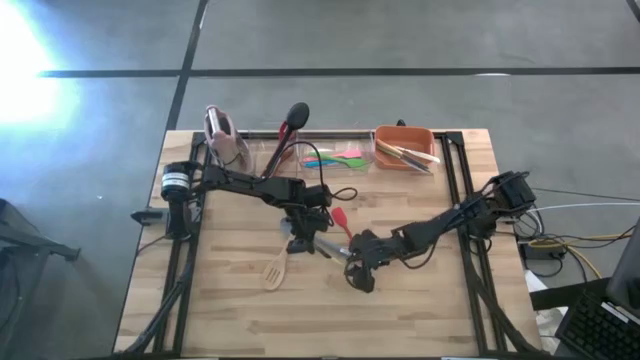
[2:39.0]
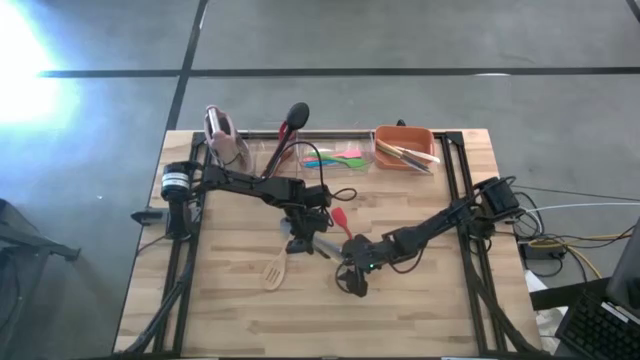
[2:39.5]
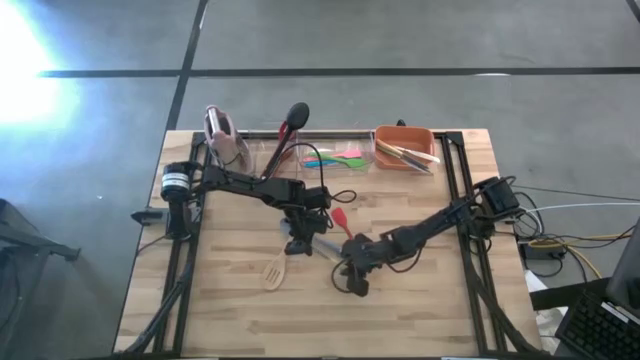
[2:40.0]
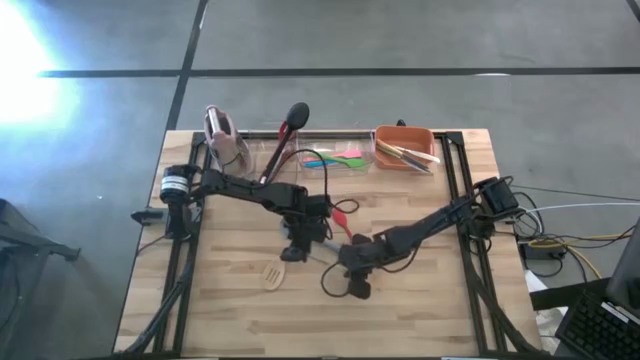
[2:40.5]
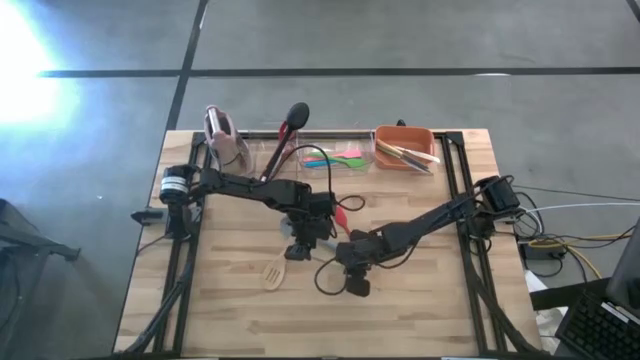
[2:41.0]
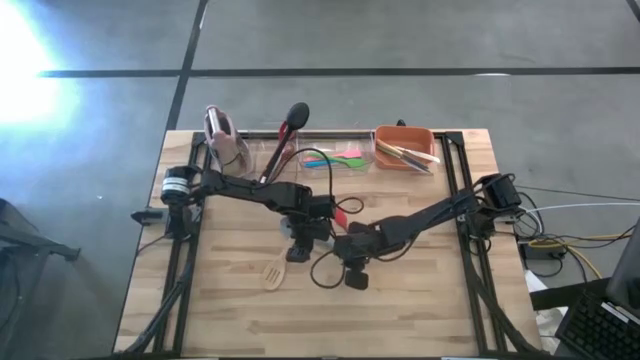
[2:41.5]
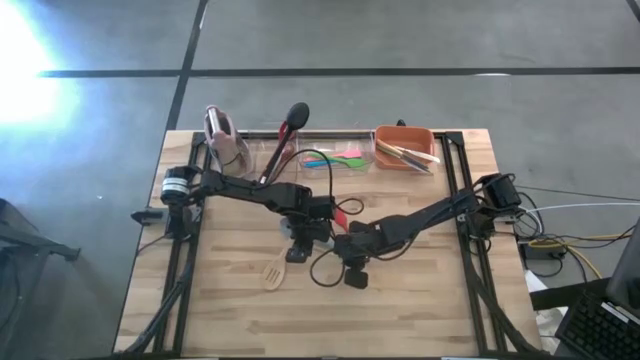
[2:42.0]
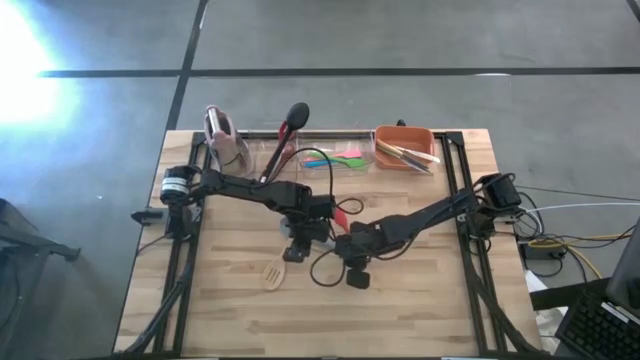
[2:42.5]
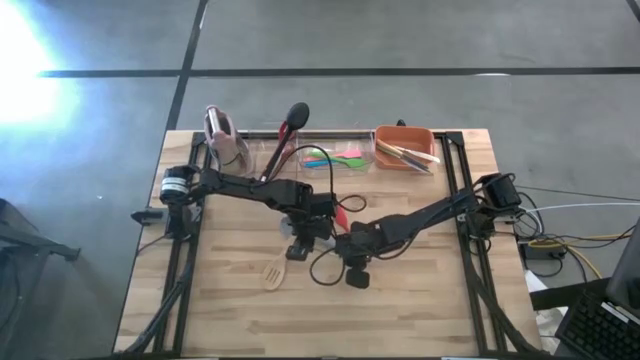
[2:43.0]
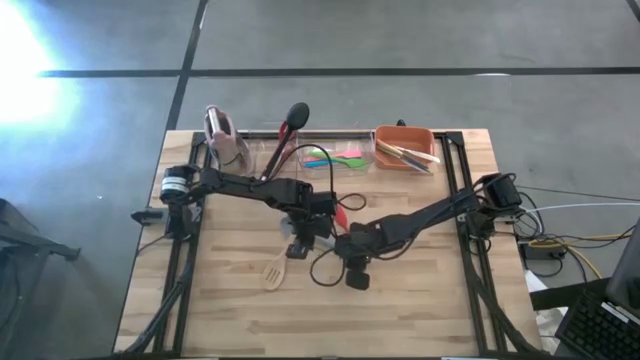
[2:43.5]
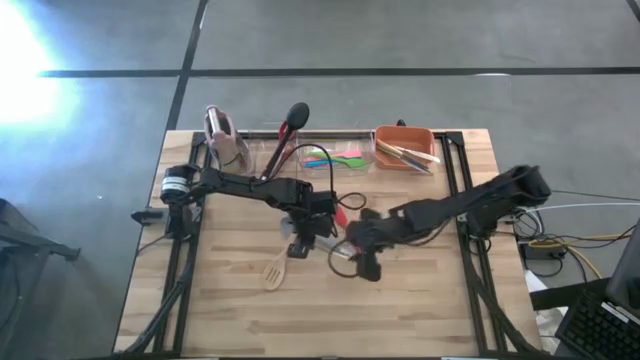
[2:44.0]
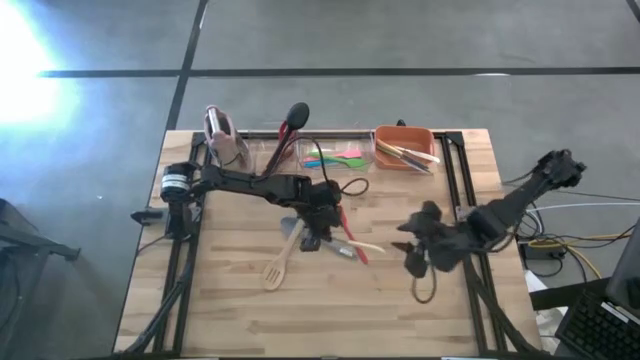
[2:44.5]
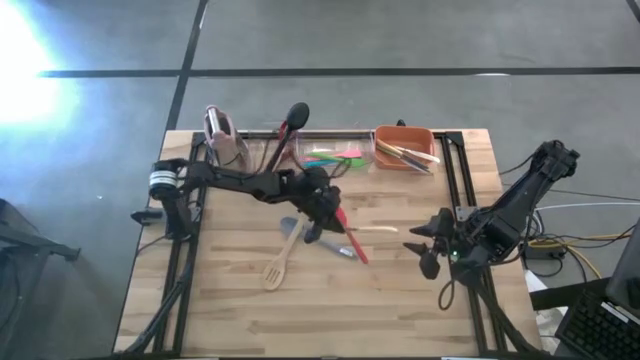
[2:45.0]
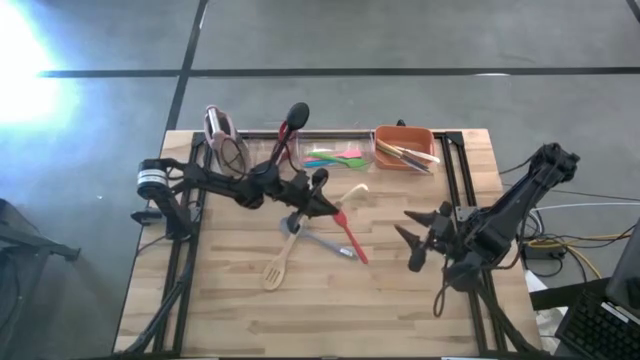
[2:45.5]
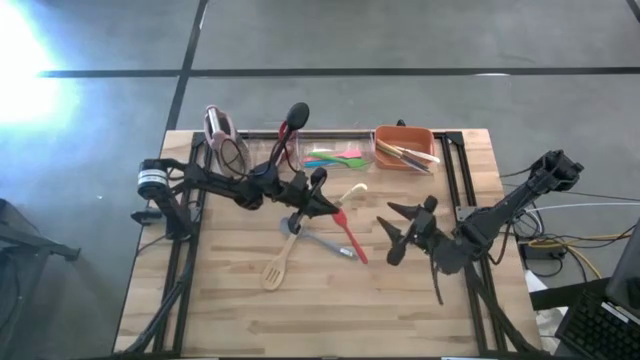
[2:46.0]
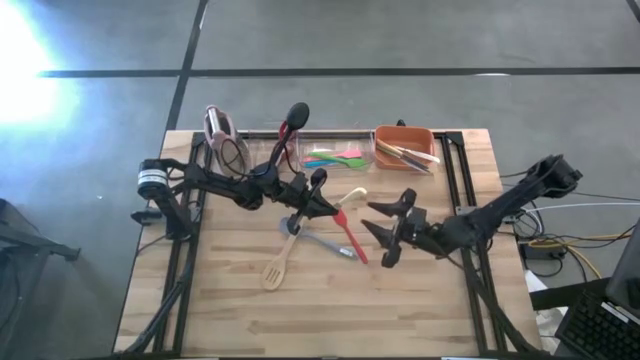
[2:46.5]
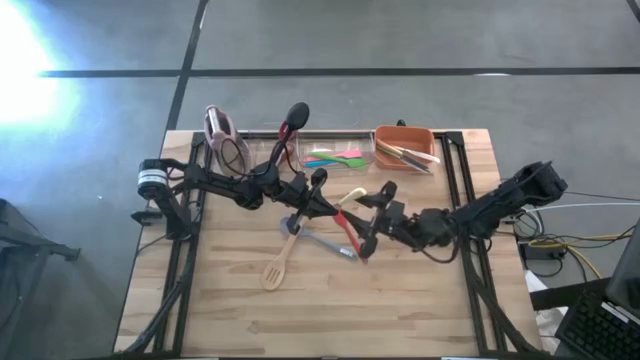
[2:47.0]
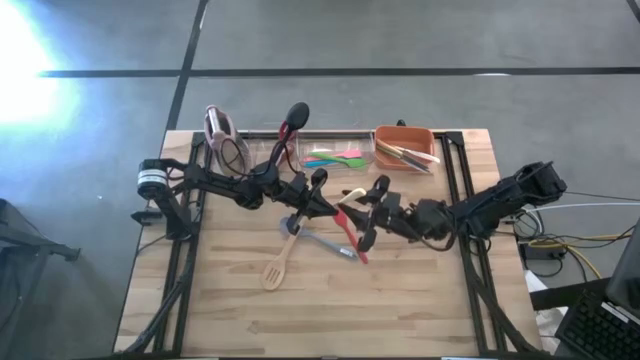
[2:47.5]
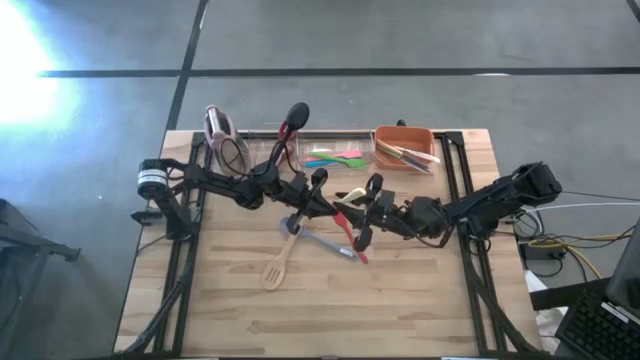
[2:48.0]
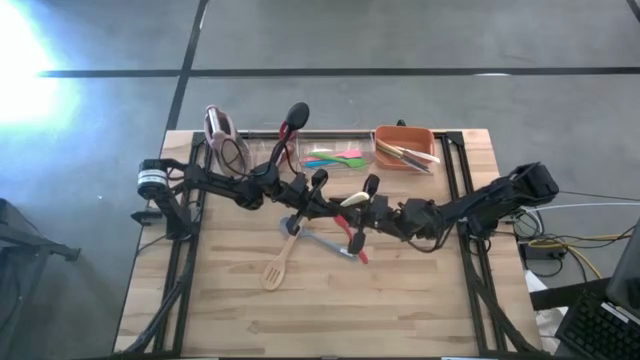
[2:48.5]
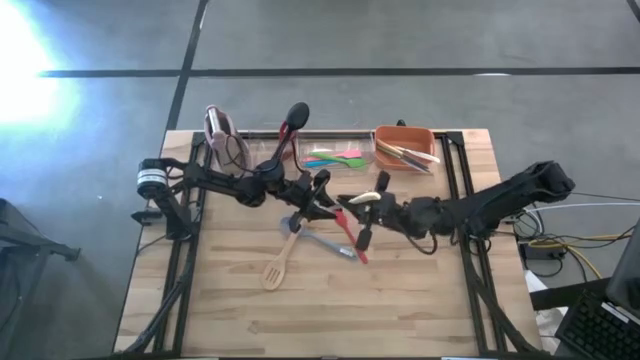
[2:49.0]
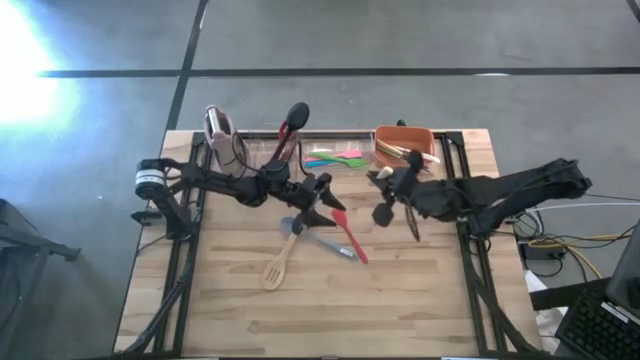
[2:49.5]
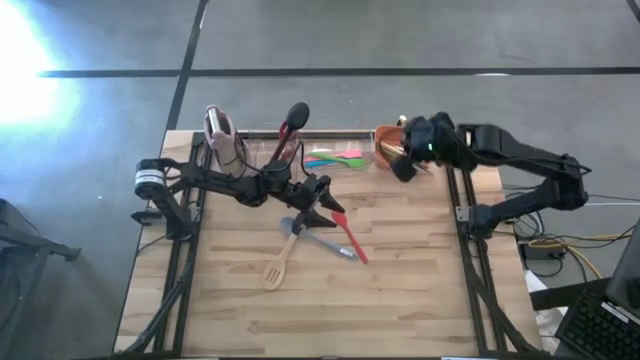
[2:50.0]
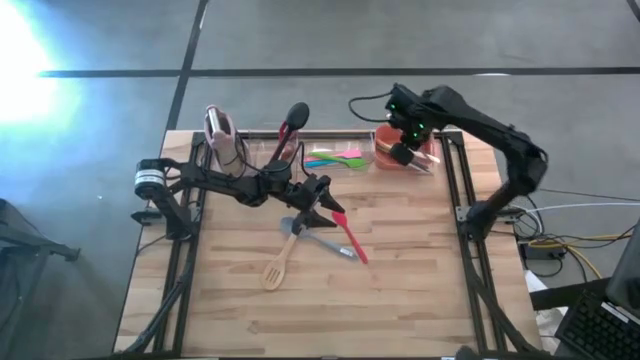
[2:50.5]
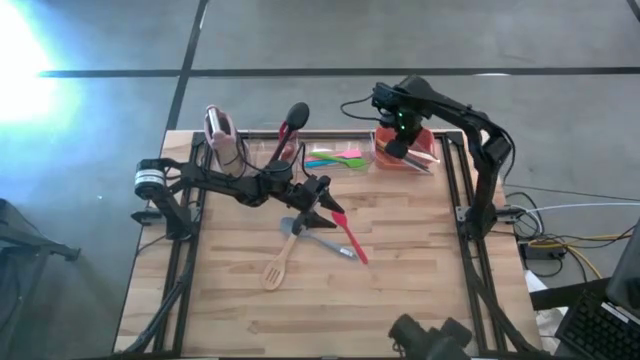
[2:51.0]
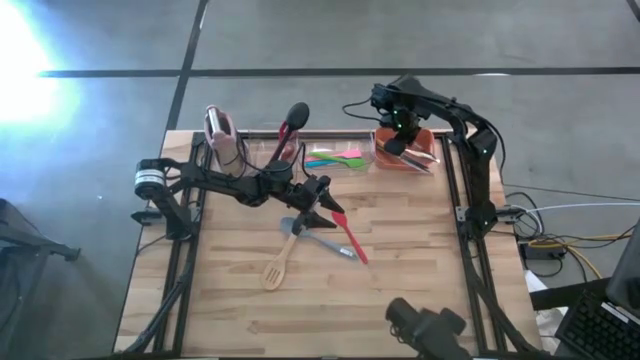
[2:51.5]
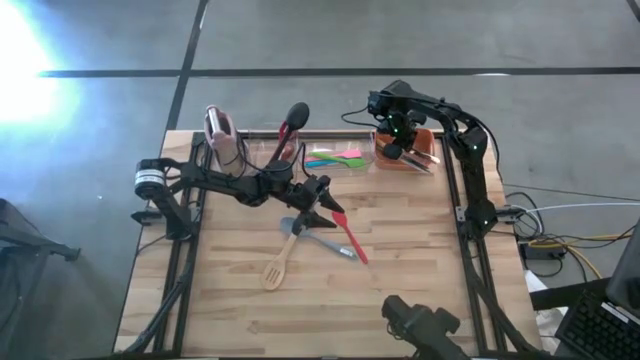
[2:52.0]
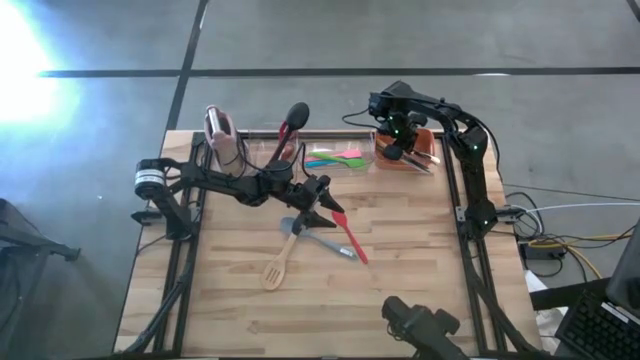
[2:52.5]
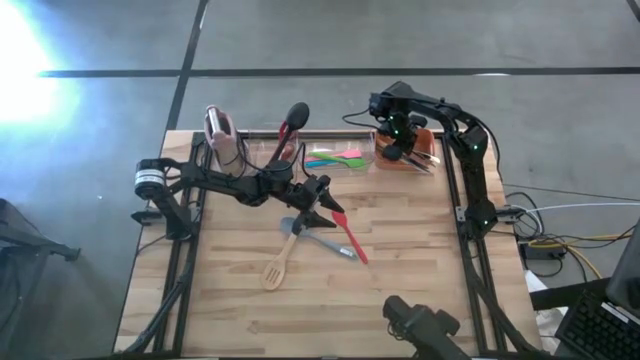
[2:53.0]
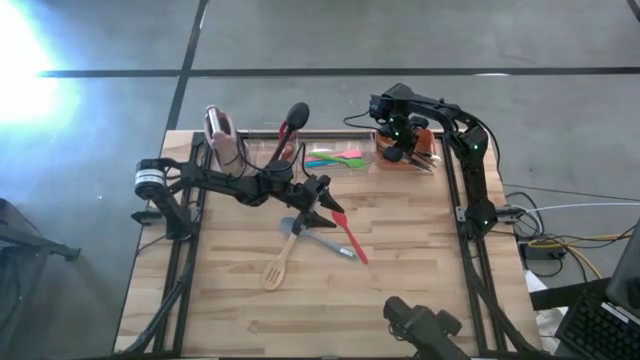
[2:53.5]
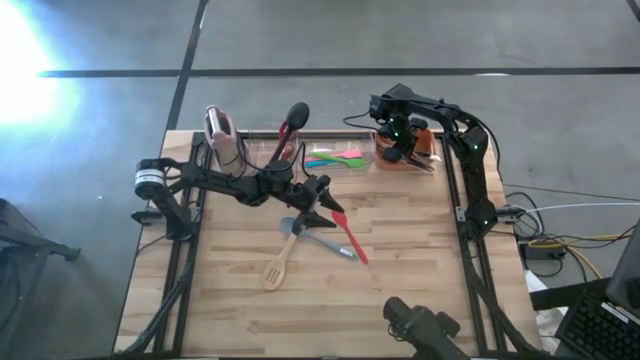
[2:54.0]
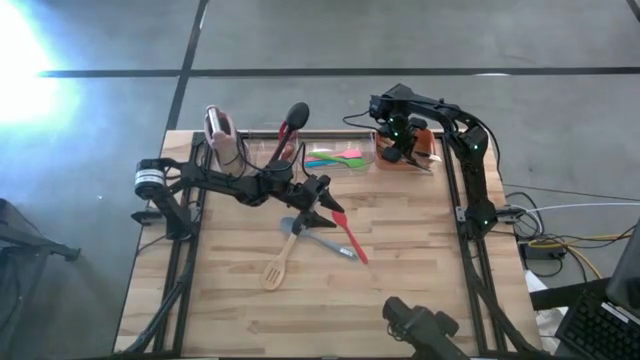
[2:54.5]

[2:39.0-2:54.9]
Task: Pick & Place Kitchen Items
Put the yellow knife into the orange bin

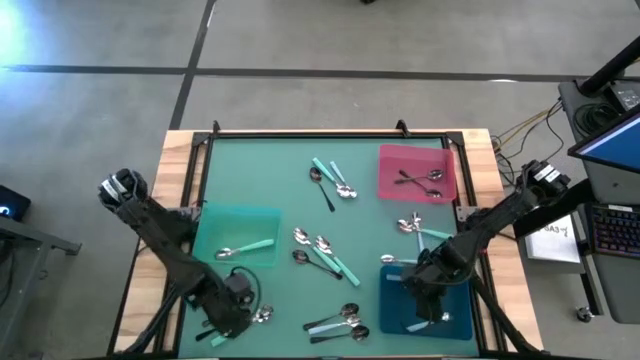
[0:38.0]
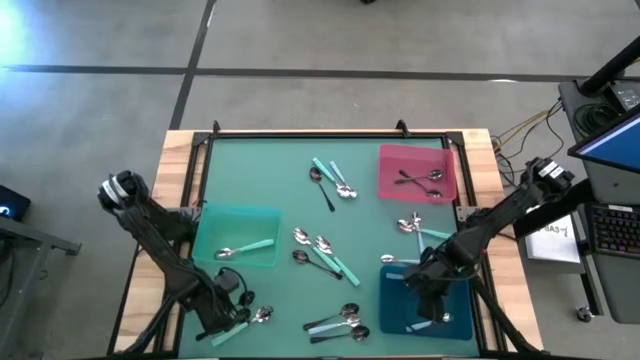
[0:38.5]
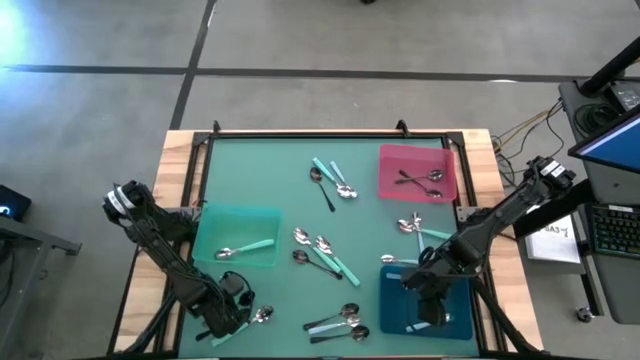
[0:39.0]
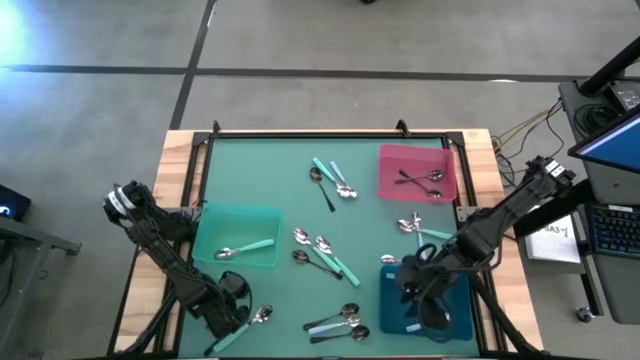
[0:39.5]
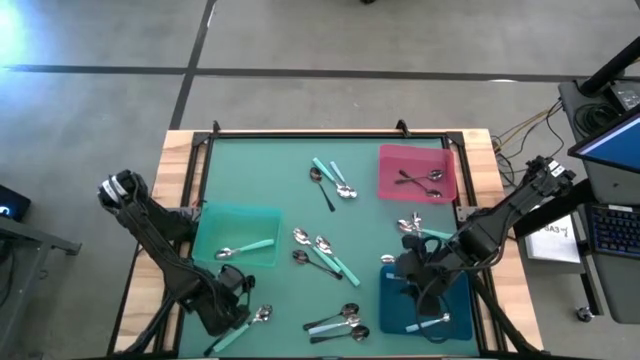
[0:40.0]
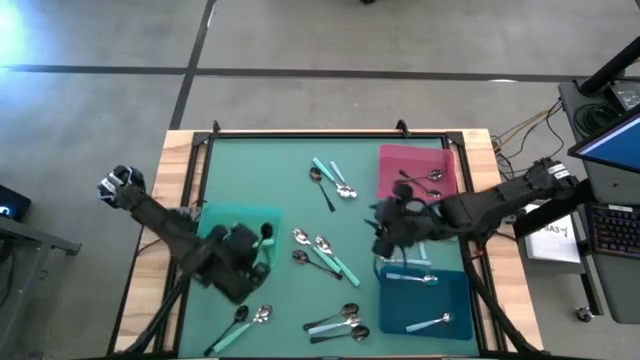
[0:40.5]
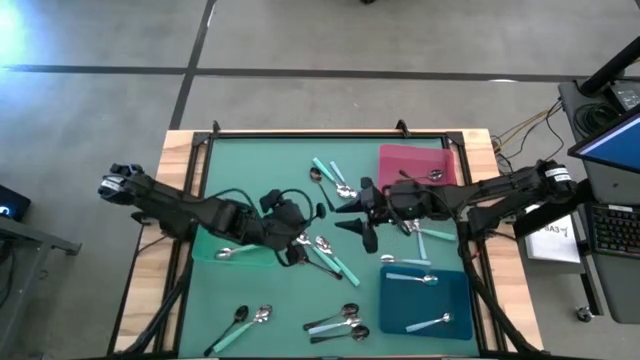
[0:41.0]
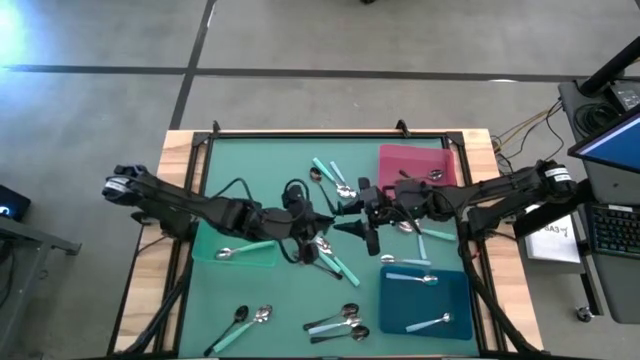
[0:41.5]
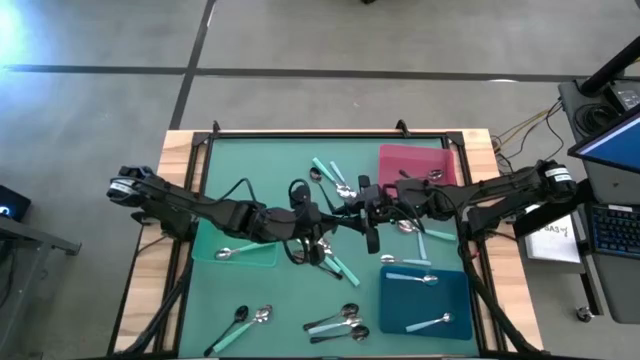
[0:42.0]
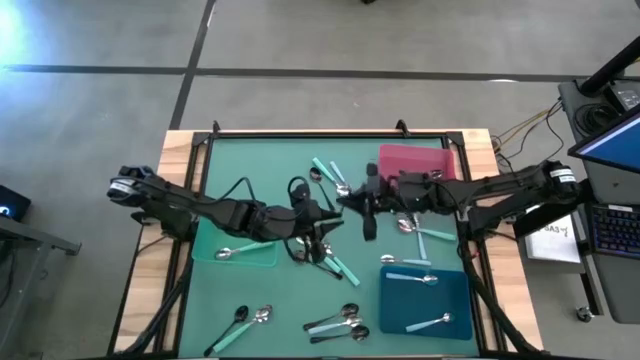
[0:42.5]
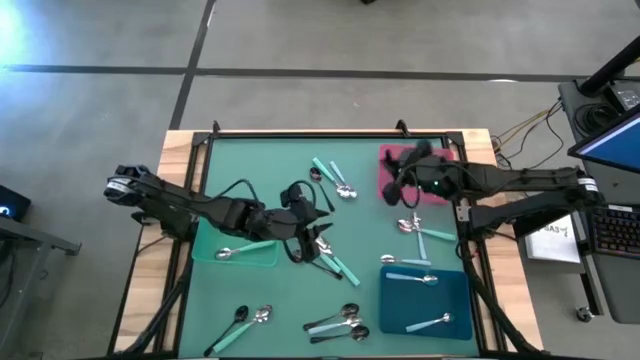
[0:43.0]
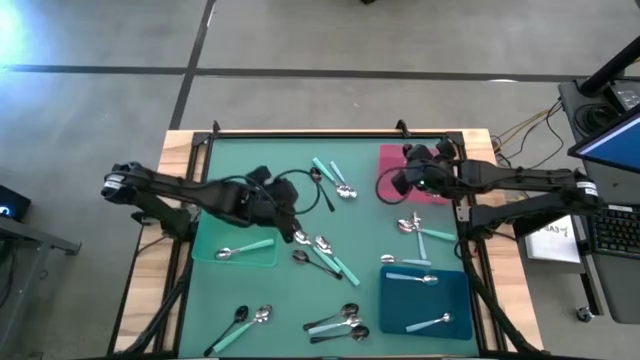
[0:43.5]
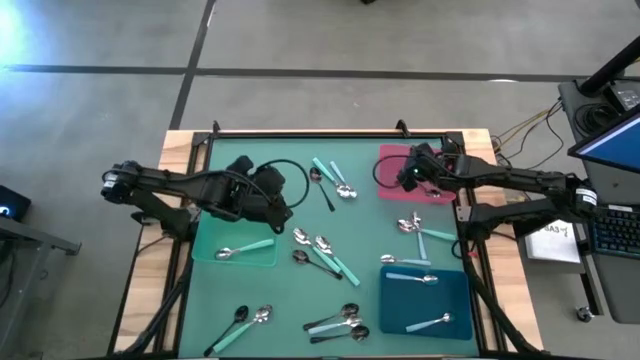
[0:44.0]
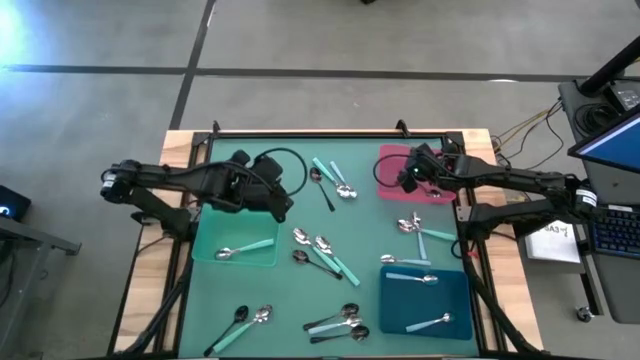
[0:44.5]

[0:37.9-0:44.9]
Task: Sort silverware by color (type)
Put the black spoon into the red bin
